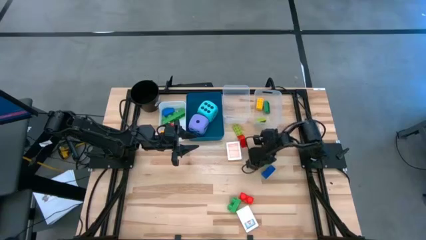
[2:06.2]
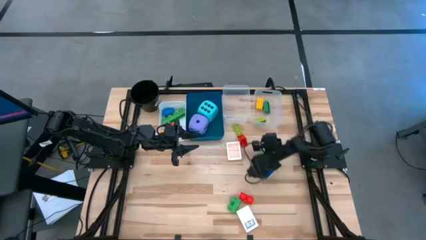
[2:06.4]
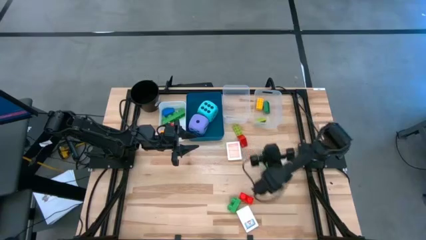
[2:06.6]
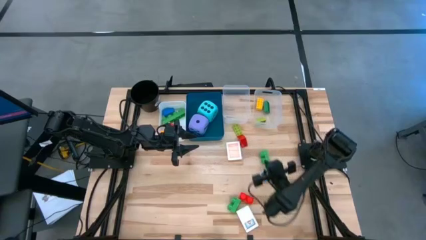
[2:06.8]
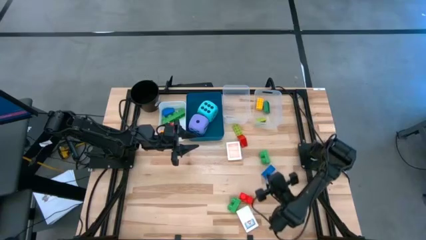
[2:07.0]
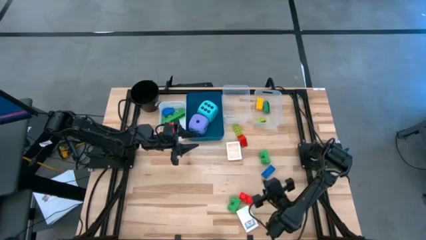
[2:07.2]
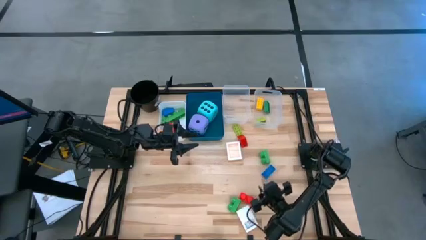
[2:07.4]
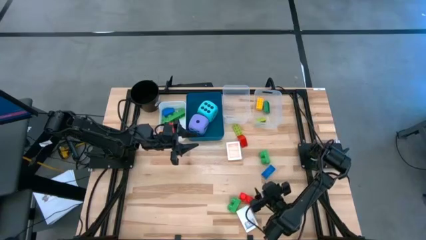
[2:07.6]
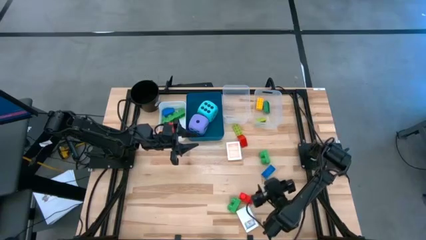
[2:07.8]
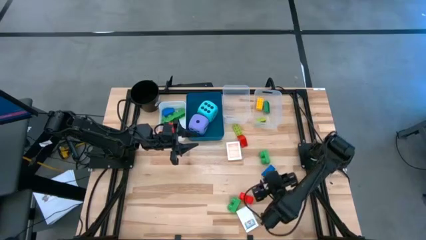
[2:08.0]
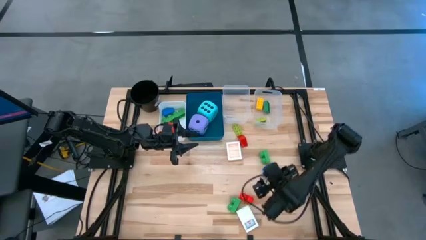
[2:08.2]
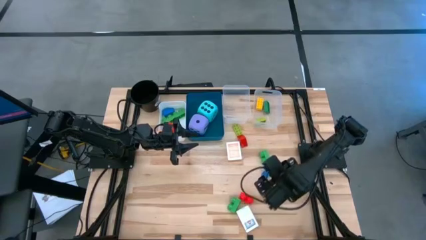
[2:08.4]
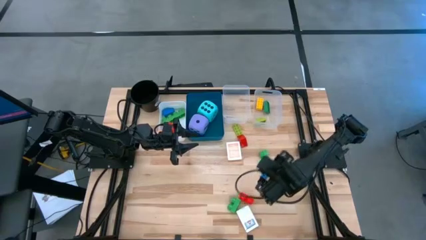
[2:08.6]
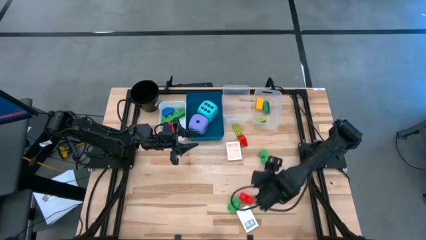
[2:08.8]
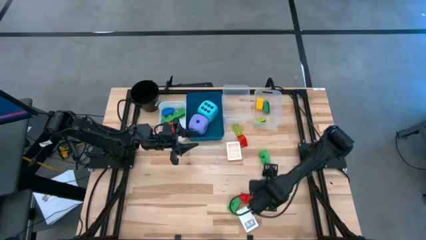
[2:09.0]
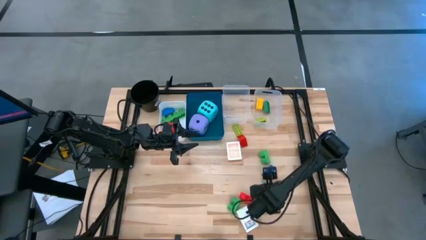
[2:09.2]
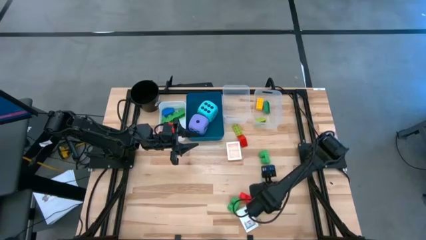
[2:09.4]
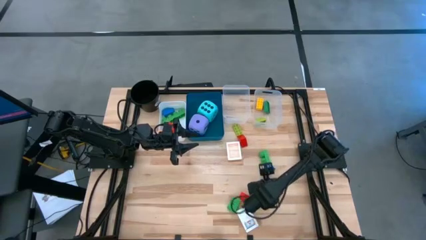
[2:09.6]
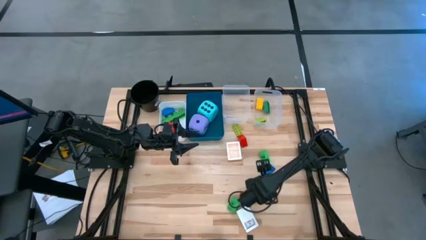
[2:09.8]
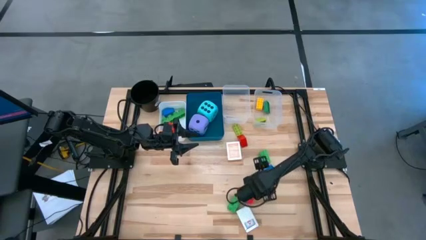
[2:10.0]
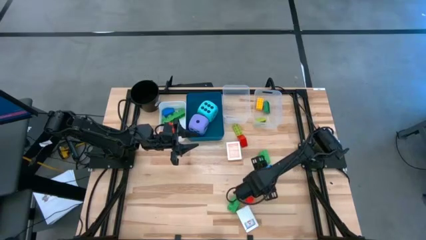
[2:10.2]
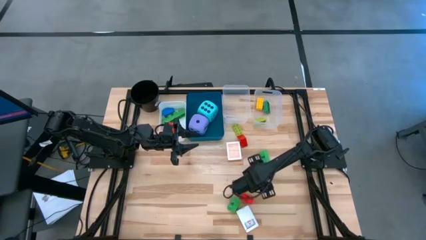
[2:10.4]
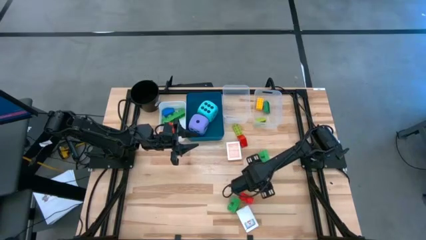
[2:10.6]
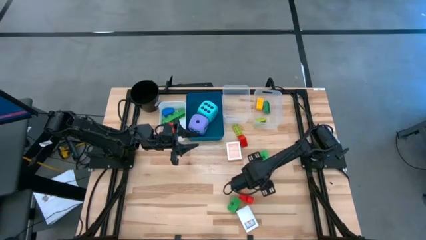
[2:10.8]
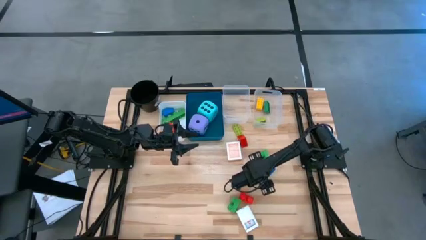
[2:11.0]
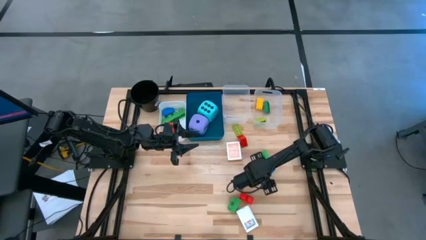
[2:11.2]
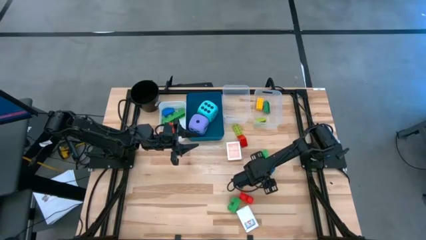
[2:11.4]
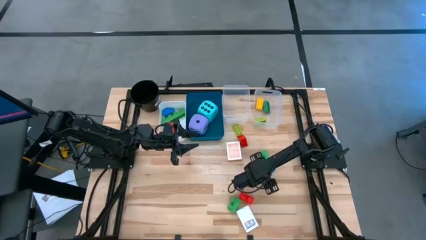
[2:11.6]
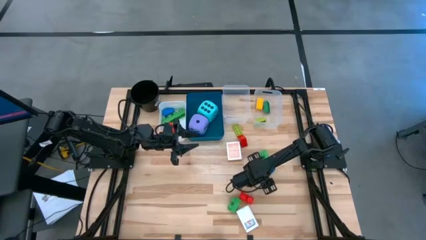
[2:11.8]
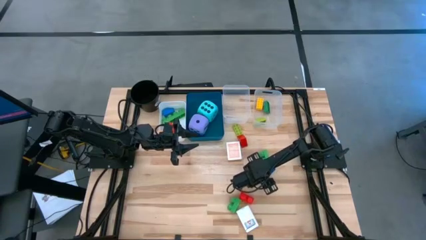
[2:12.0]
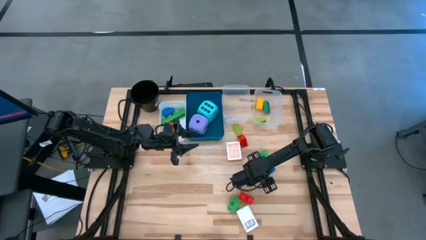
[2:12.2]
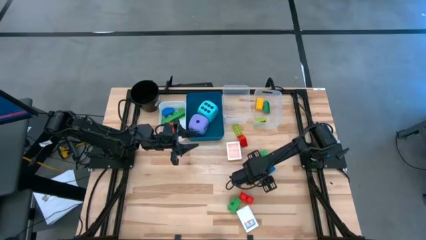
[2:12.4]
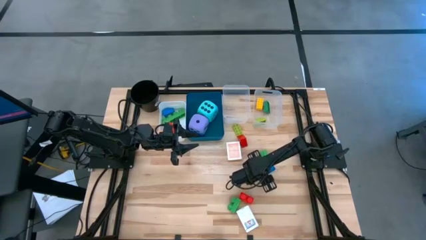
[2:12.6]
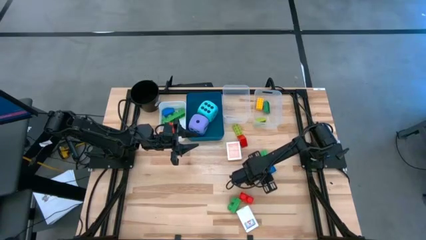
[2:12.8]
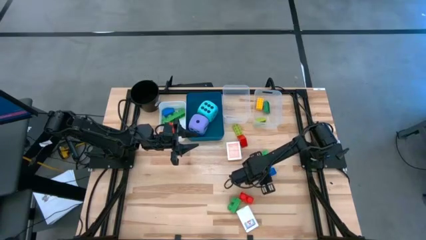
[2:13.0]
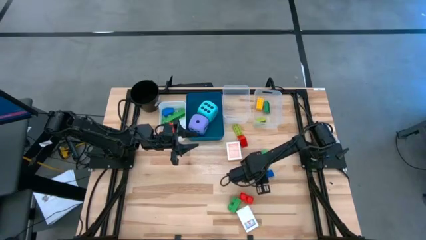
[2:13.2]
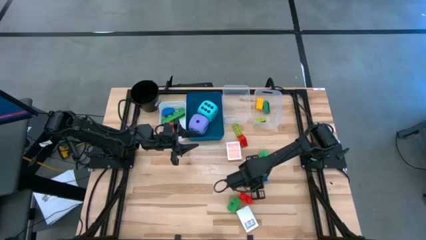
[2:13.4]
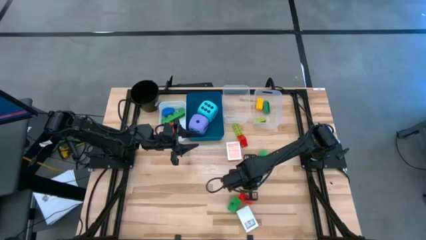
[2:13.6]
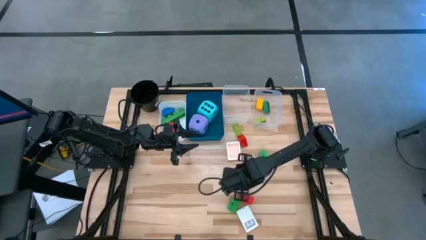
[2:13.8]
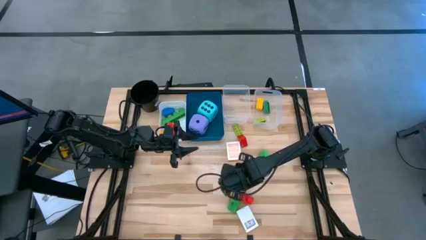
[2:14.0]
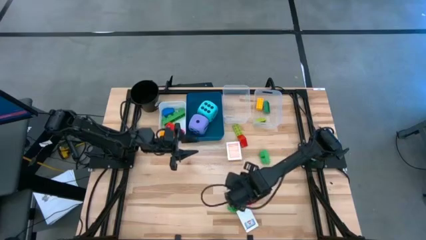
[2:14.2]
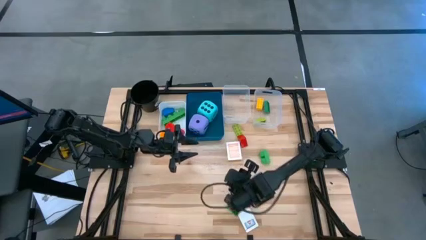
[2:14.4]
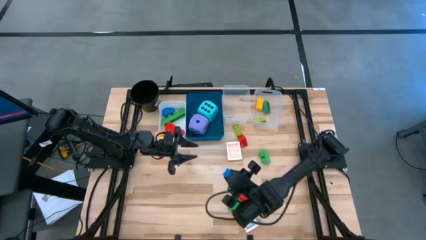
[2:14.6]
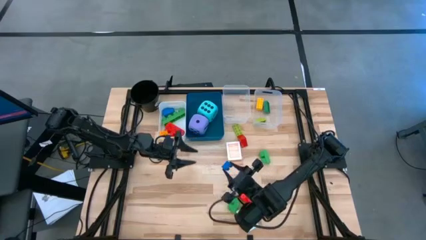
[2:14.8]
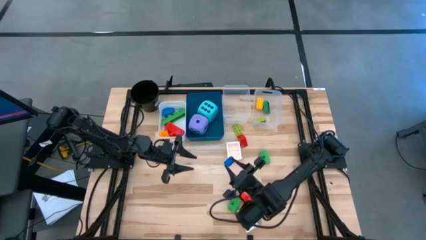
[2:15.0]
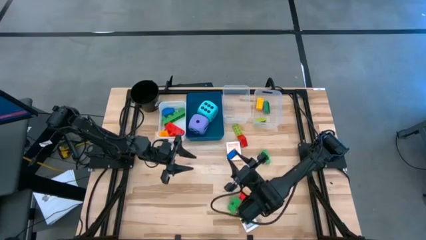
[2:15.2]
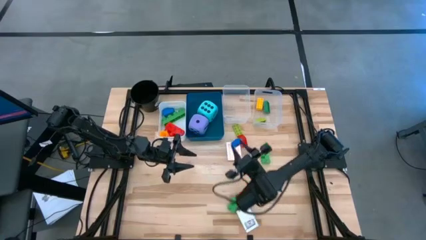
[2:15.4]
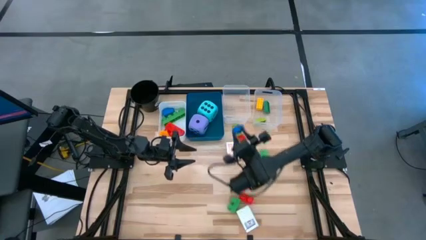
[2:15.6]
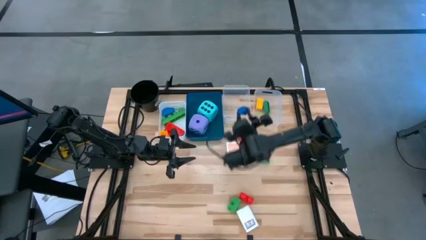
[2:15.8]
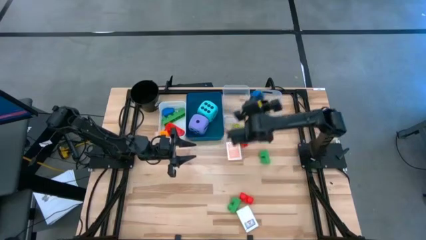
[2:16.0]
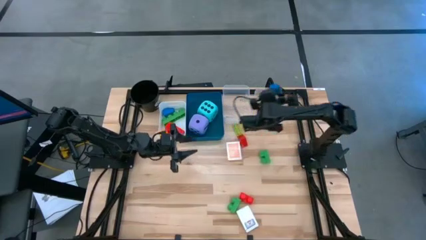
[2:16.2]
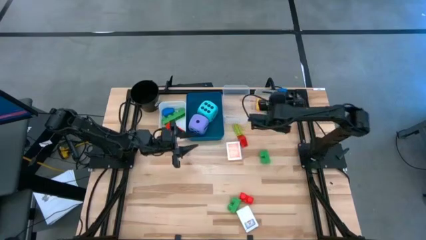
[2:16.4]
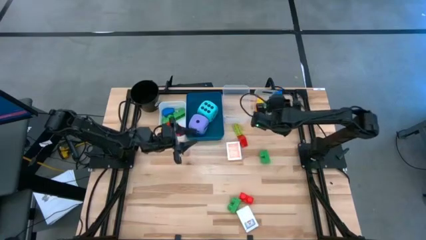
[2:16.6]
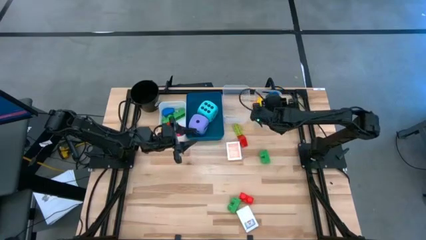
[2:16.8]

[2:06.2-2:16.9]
Task: Pick & Place Toys
Put the small blue game piece into the right transparent bin

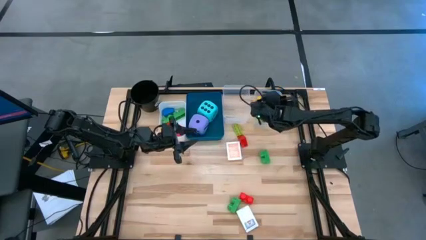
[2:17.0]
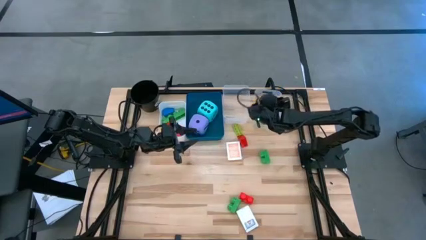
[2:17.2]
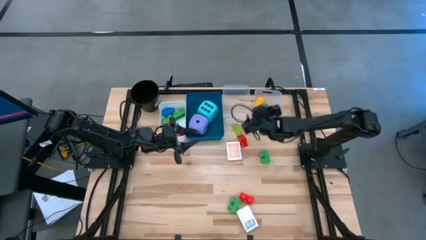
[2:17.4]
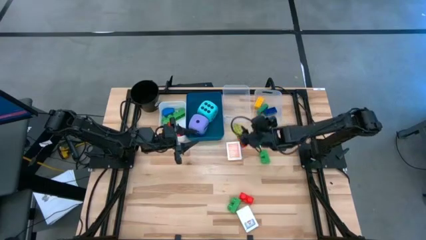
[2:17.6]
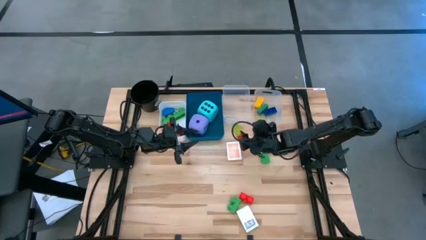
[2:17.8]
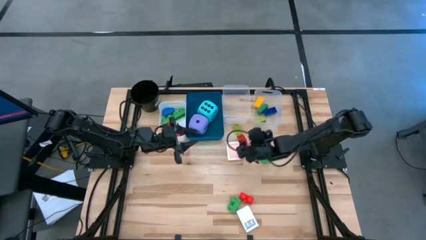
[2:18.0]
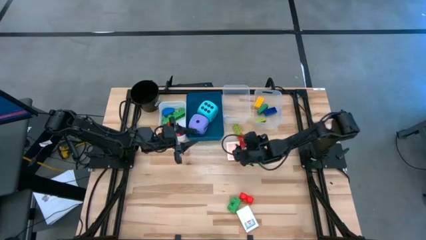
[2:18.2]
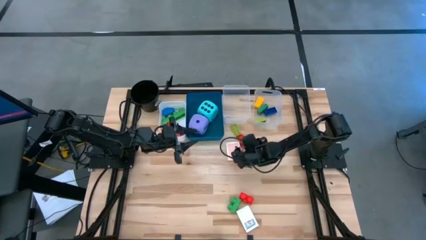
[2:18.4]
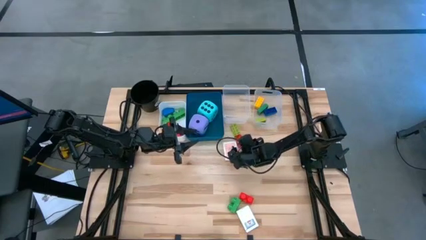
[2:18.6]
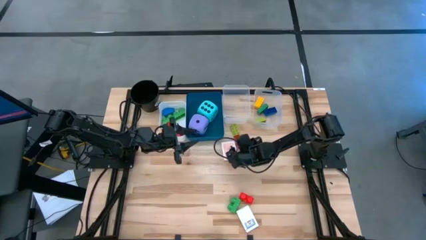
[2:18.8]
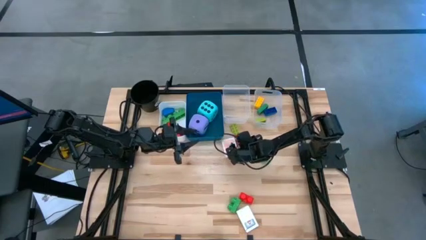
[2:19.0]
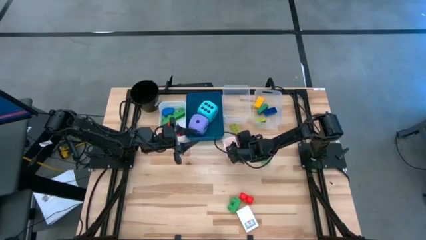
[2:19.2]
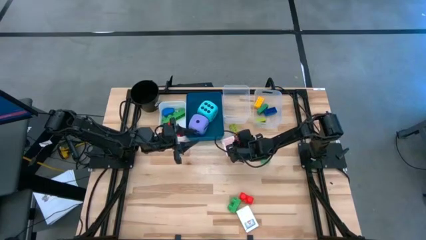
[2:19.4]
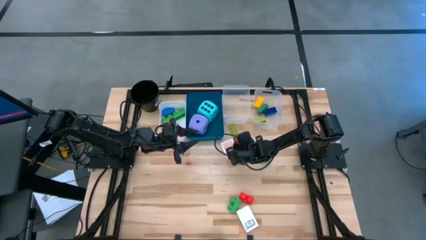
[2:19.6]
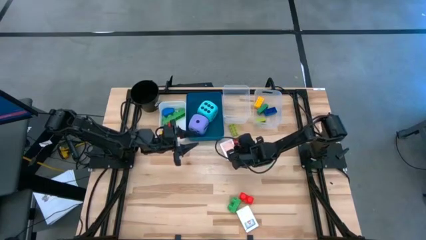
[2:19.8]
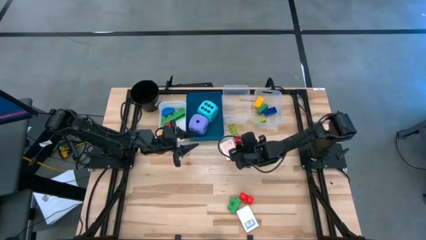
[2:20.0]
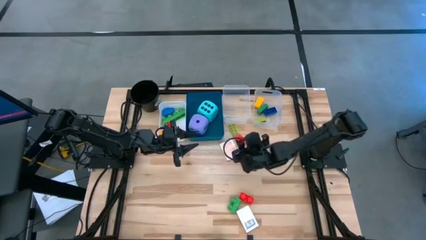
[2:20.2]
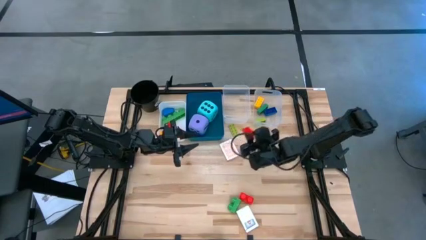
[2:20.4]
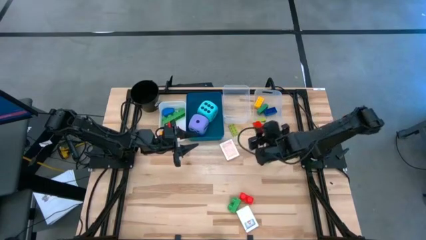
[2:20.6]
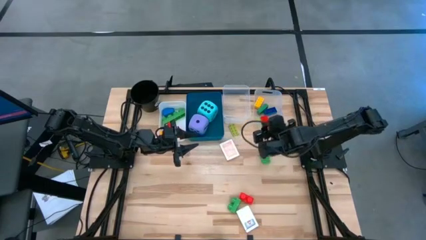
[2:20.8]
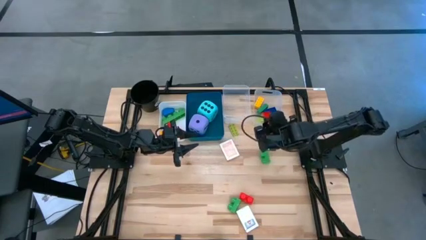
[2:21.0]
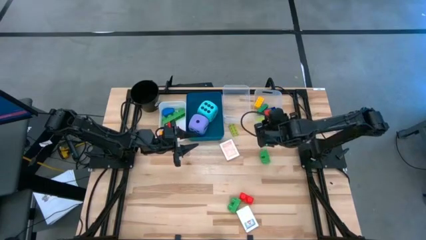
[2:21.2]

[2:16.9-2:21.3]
Put the small red game piece into the right transparent bin

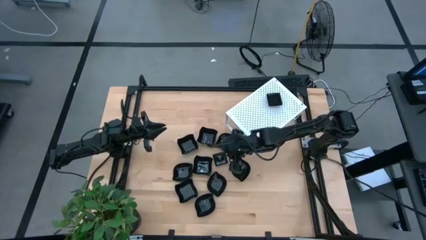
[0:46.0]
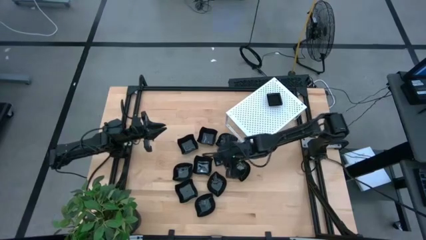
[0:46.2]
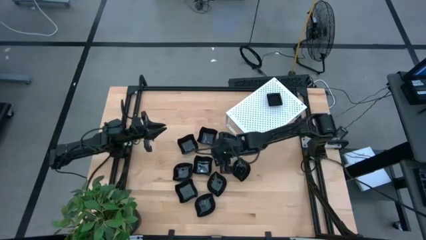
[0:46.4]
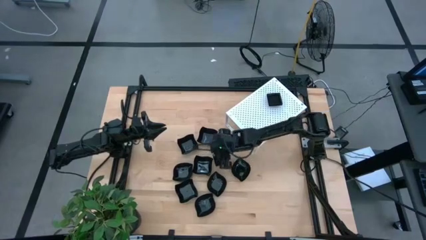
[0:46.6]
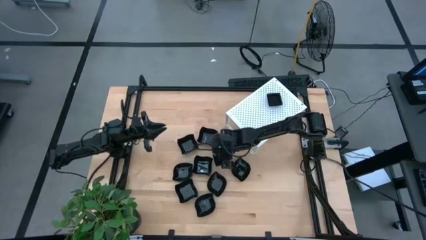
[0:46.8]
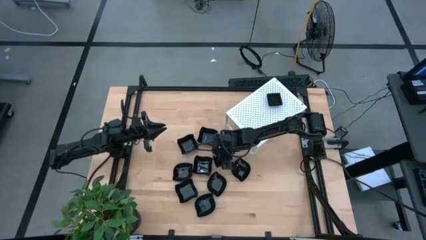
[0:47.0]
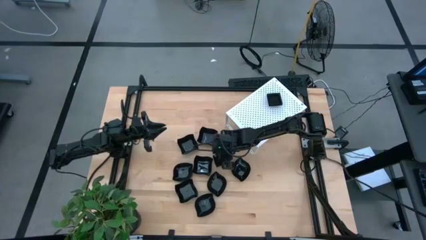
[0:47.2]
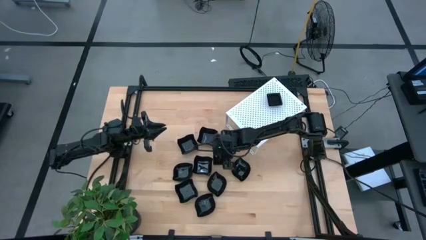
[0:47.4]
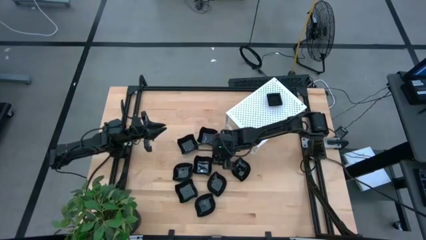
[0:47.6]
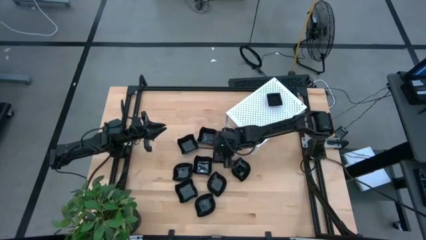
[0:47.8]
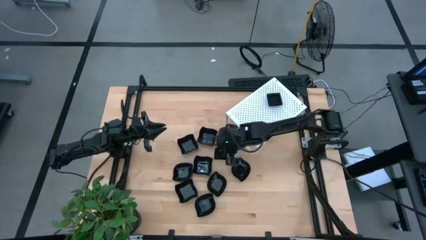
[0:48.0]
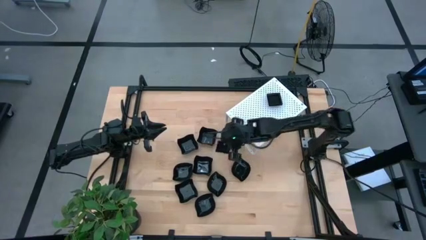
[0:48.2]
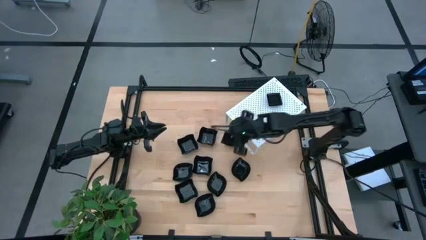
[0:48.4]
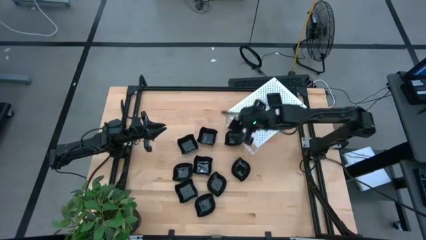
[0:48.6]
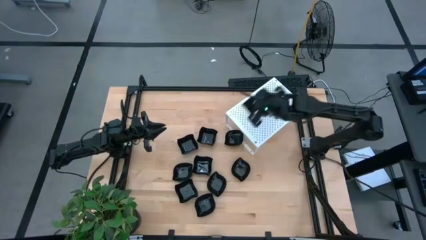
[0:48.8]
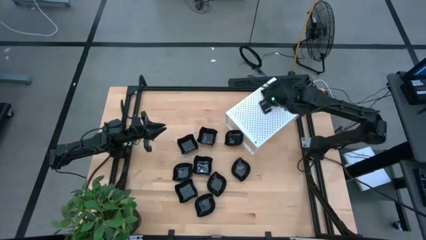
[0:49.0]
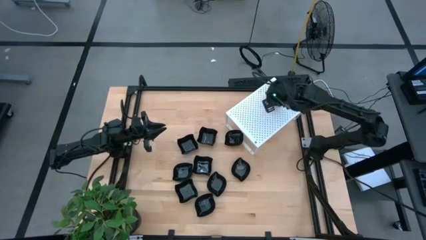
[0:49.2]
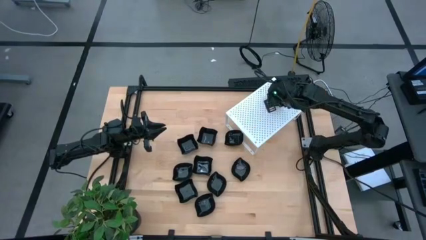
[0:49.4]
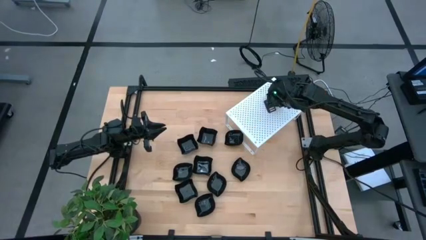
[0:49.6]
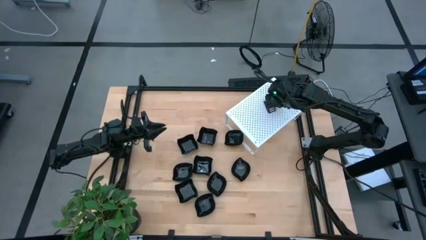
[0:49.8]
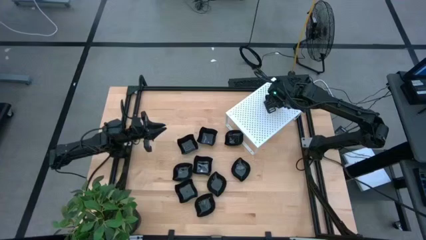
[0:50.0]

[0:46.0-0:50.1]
Task: Pick & Place Mini shaped plates
Stack the black square plate on top of the black square plates on the shelf
